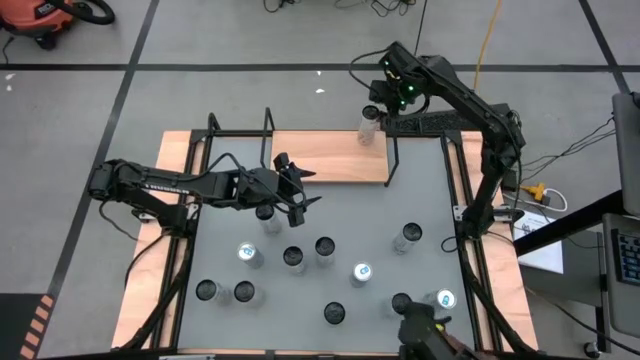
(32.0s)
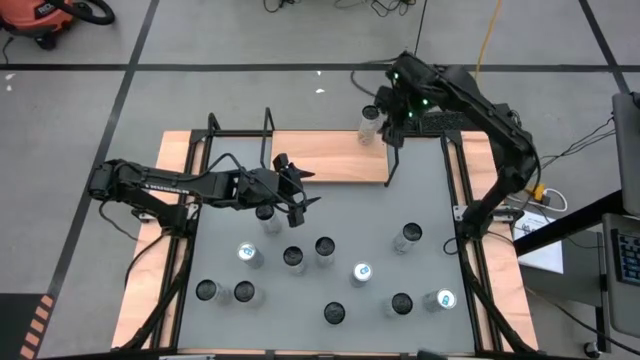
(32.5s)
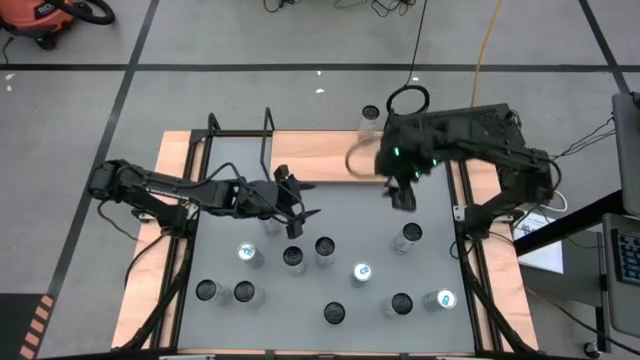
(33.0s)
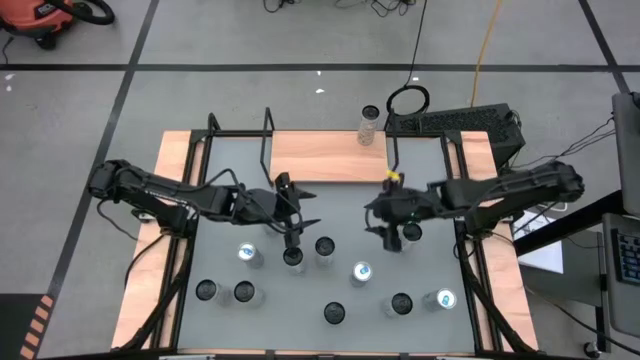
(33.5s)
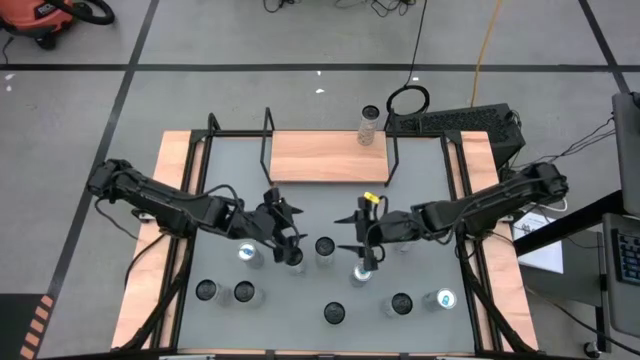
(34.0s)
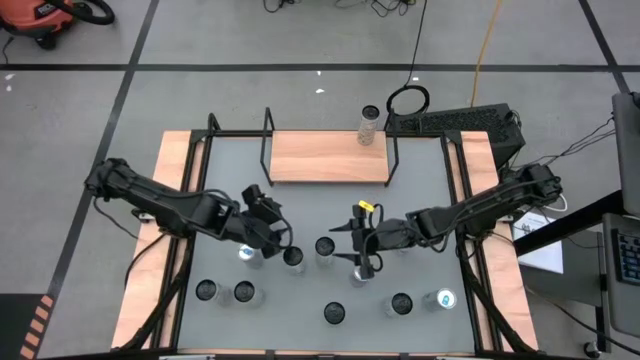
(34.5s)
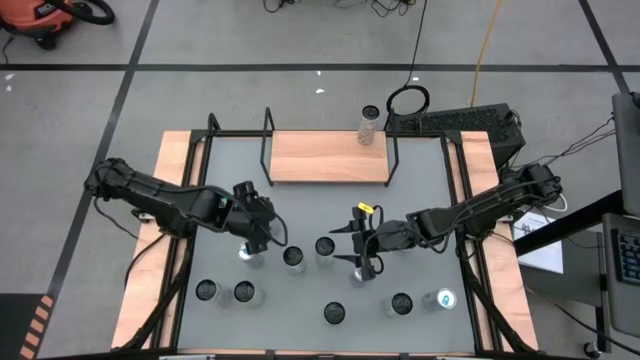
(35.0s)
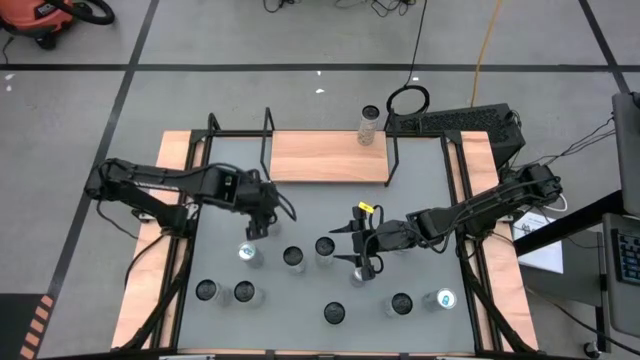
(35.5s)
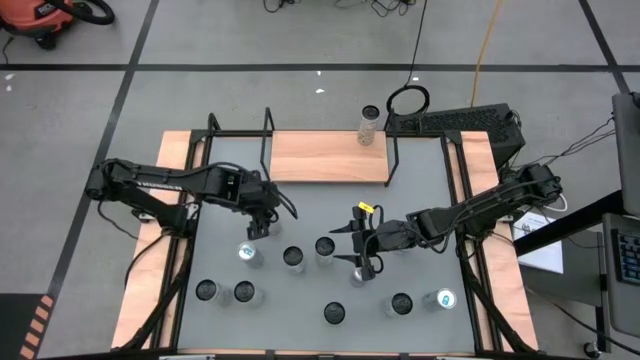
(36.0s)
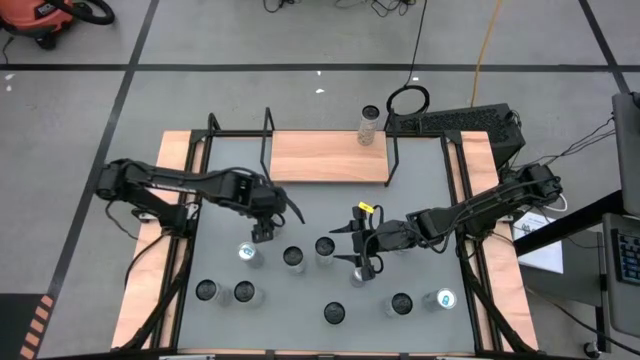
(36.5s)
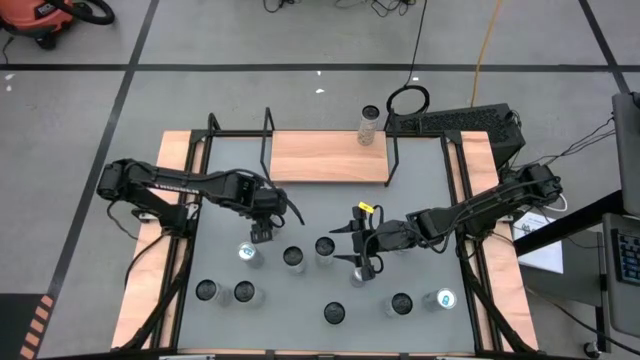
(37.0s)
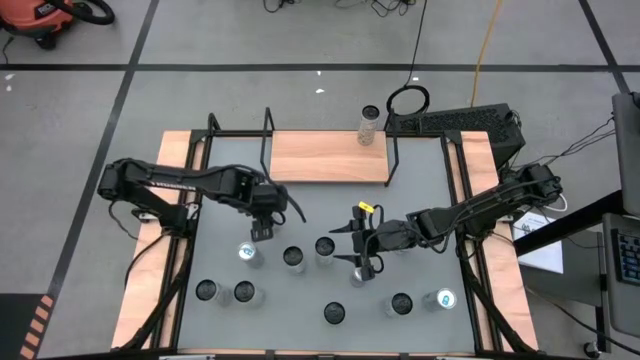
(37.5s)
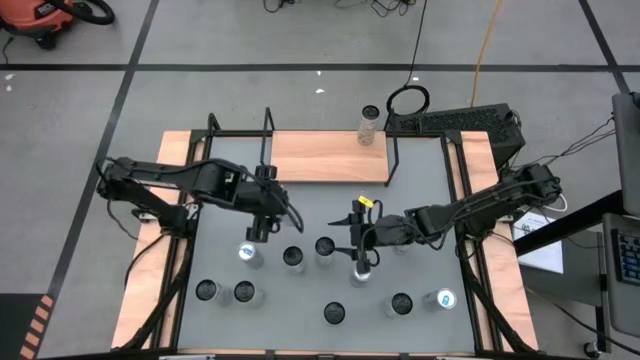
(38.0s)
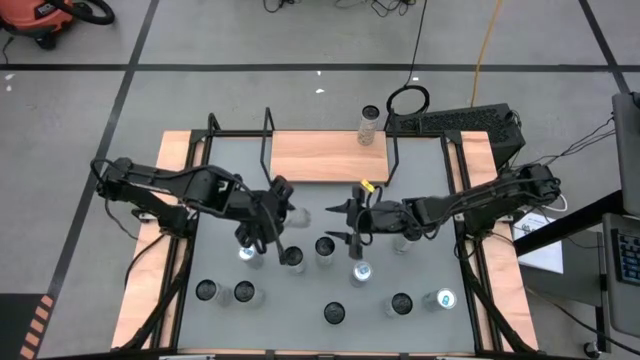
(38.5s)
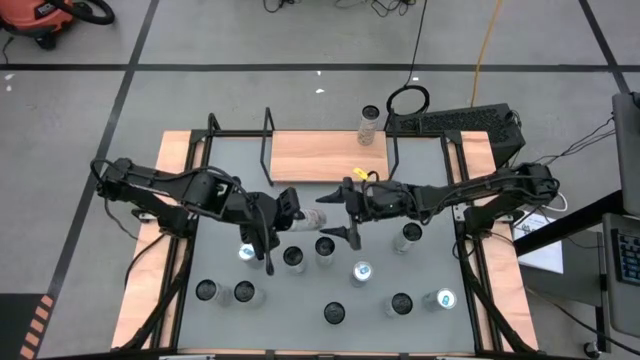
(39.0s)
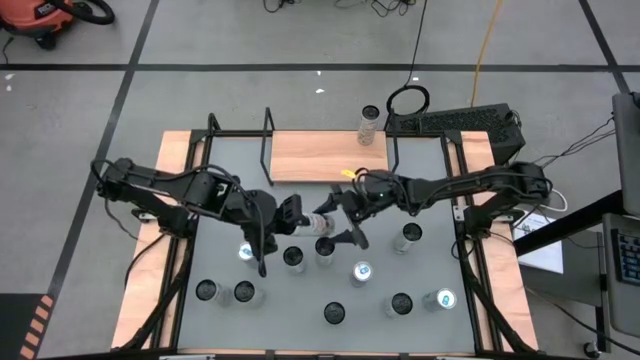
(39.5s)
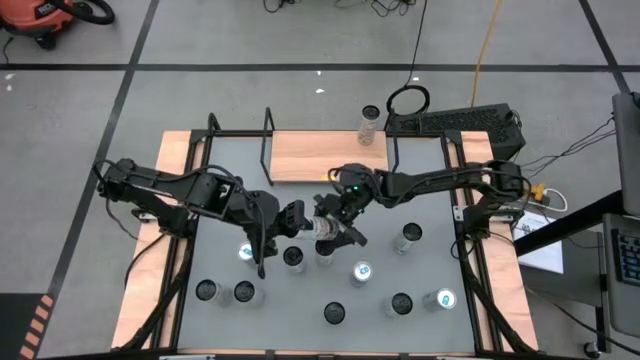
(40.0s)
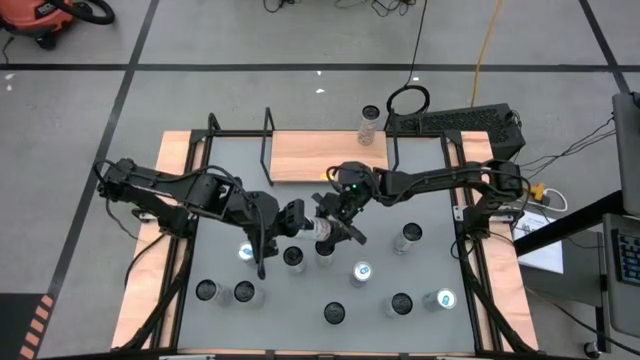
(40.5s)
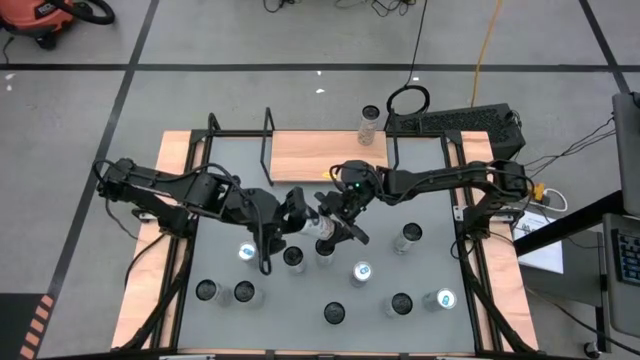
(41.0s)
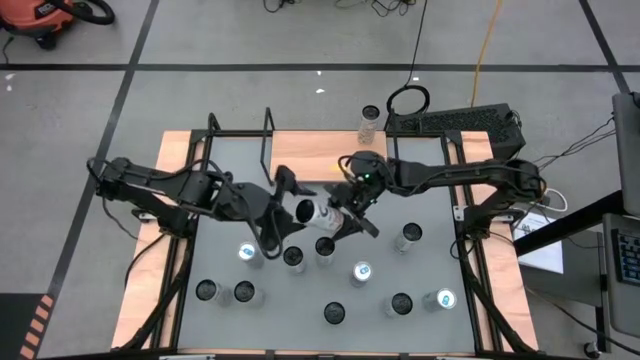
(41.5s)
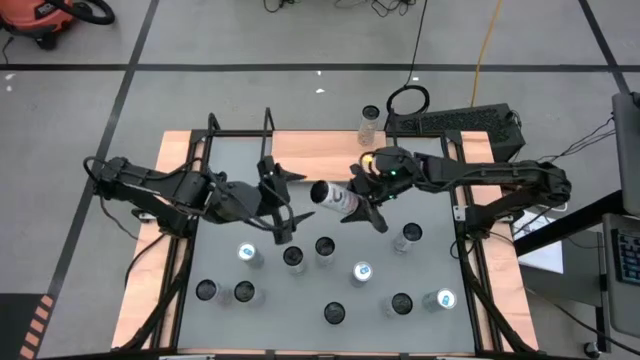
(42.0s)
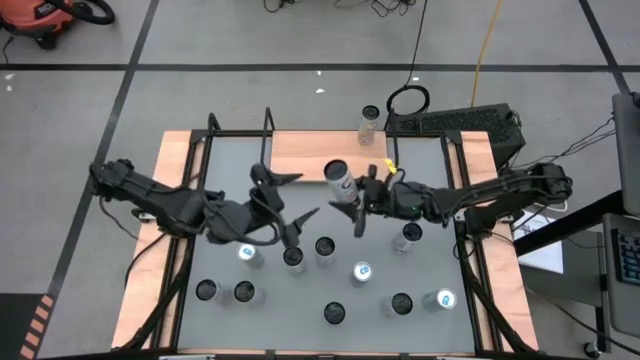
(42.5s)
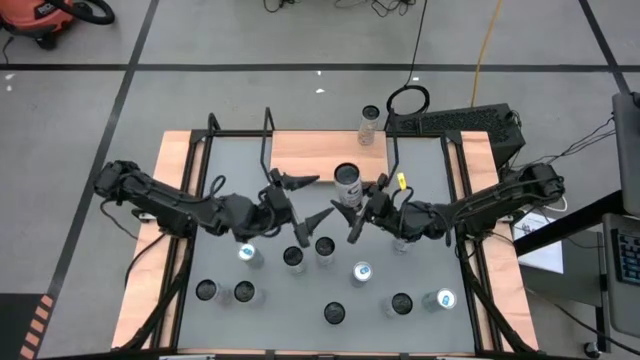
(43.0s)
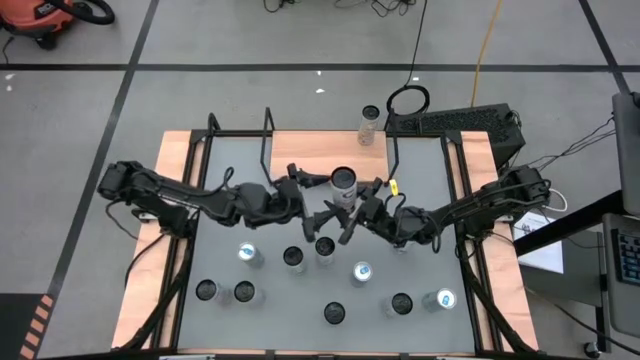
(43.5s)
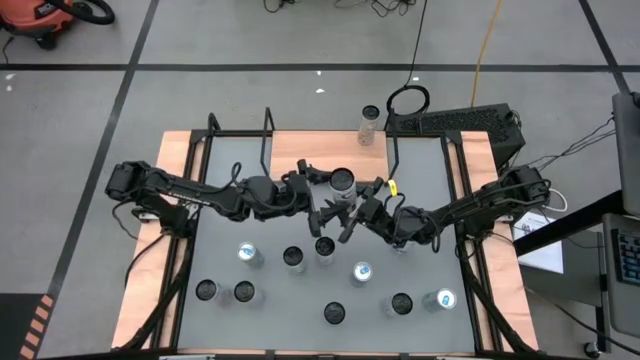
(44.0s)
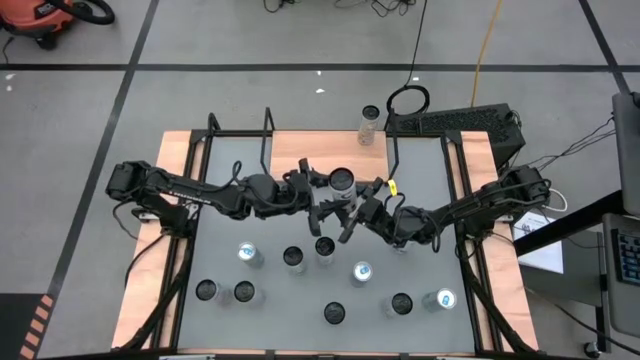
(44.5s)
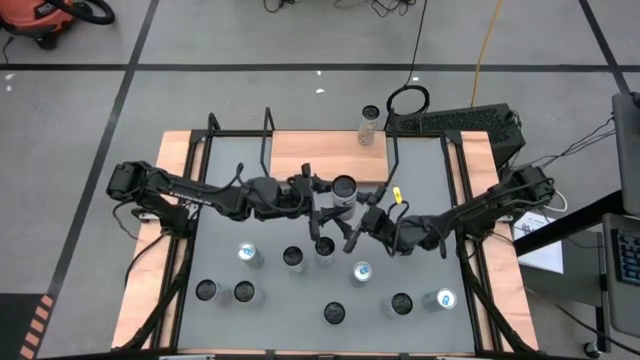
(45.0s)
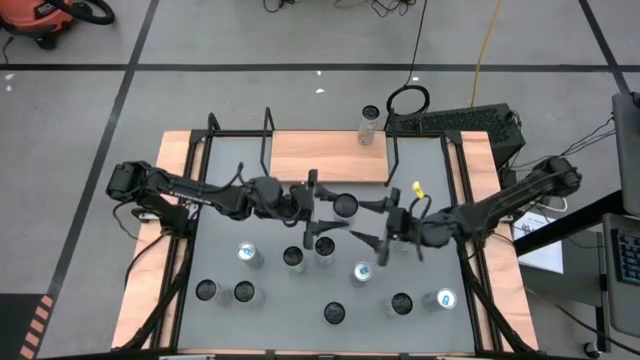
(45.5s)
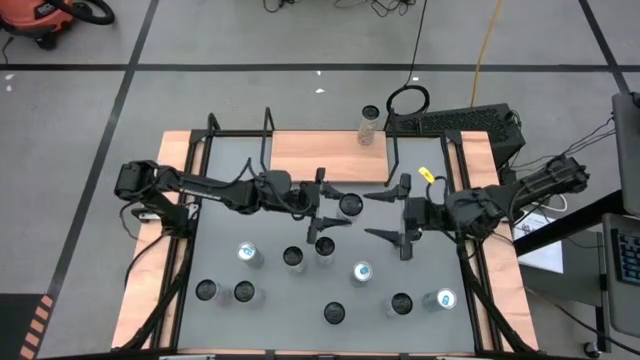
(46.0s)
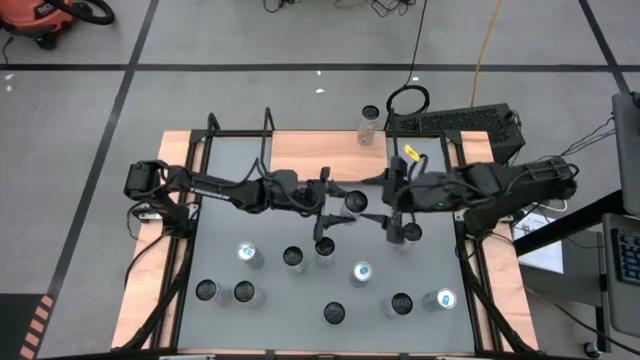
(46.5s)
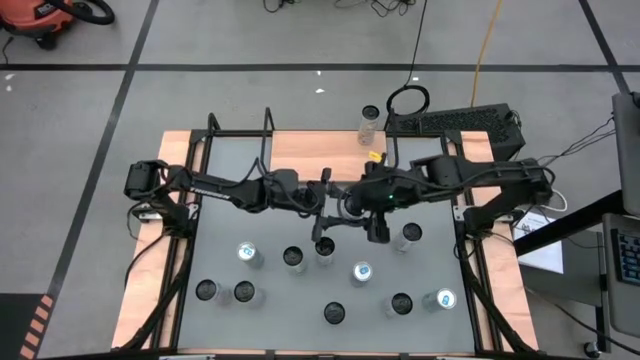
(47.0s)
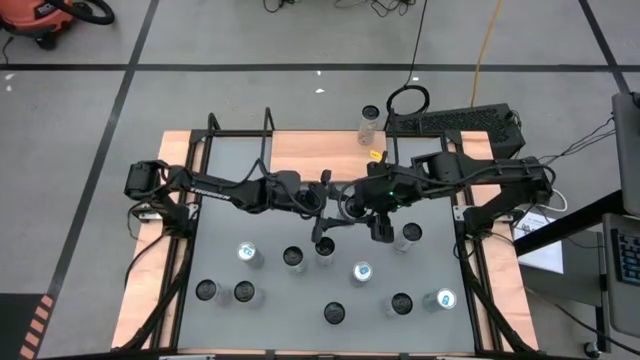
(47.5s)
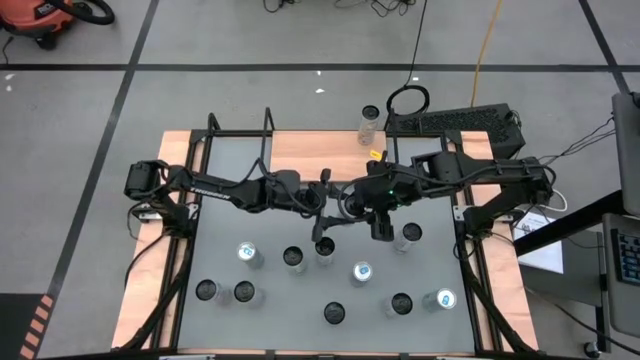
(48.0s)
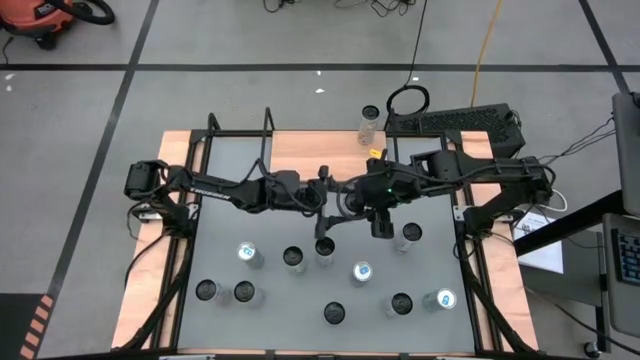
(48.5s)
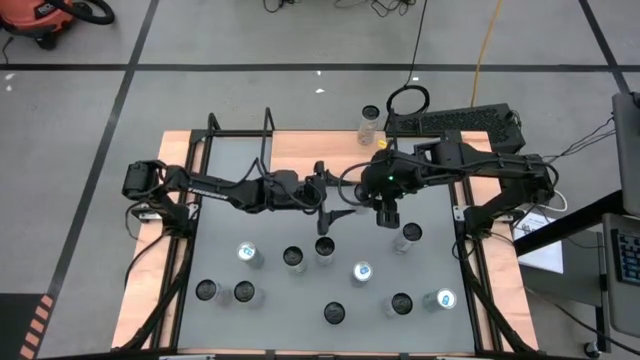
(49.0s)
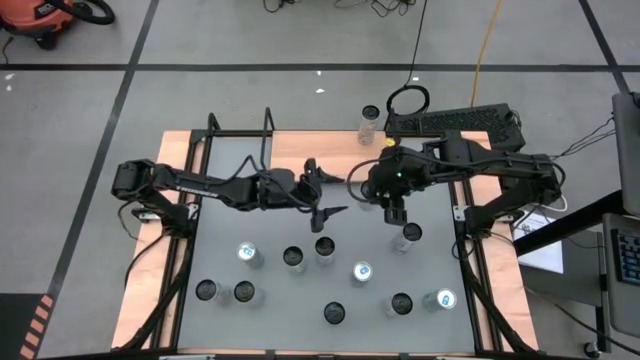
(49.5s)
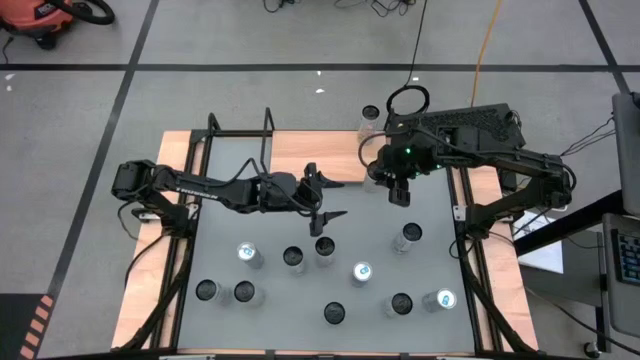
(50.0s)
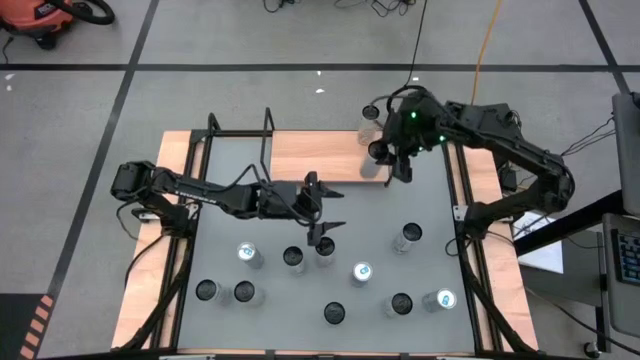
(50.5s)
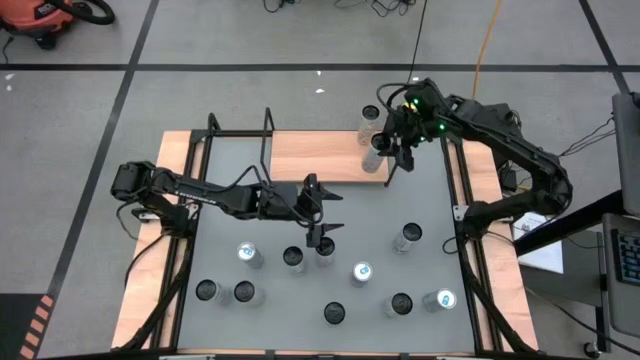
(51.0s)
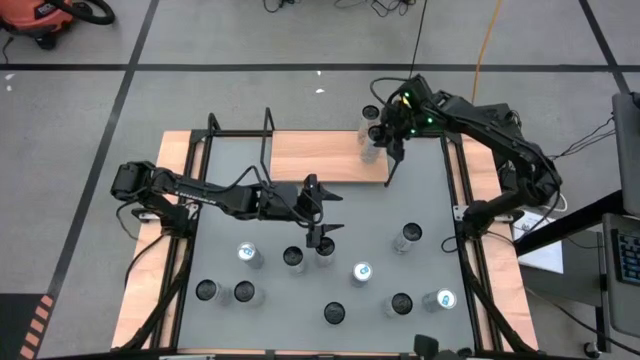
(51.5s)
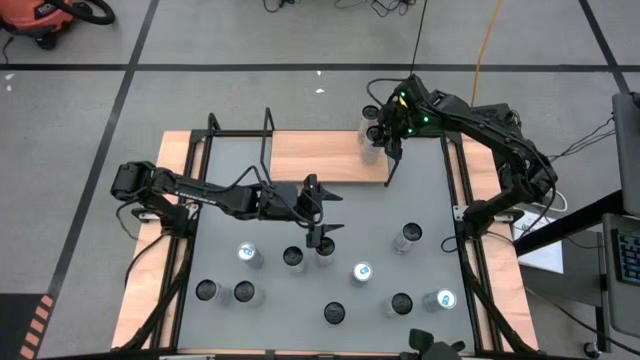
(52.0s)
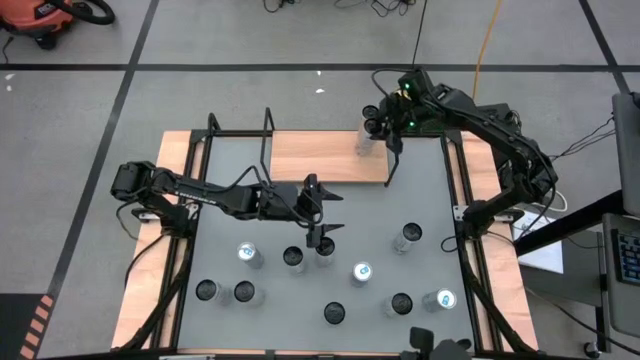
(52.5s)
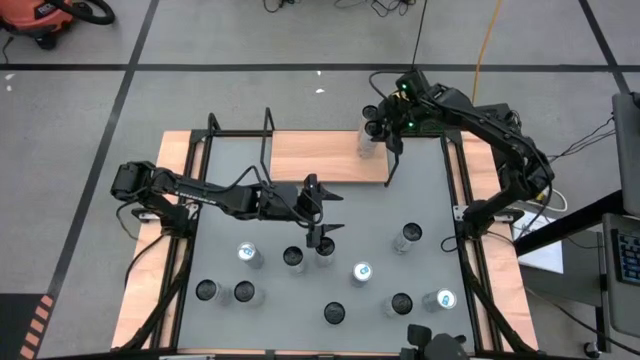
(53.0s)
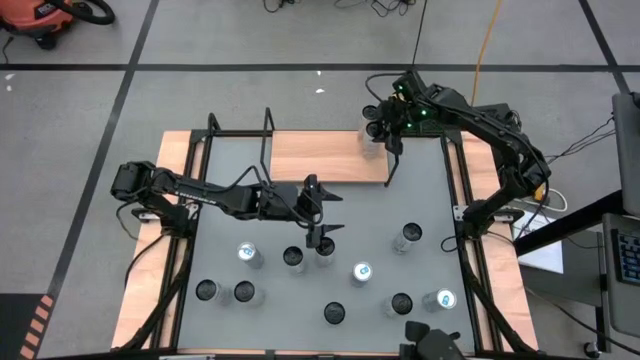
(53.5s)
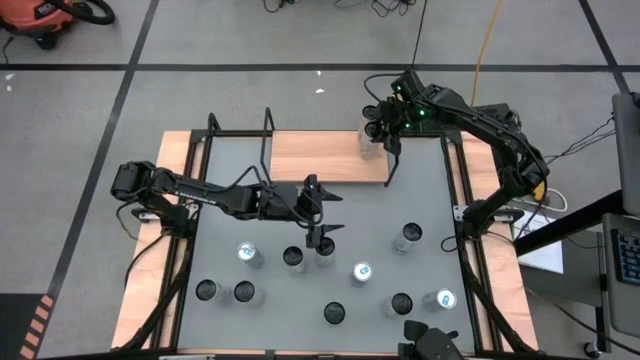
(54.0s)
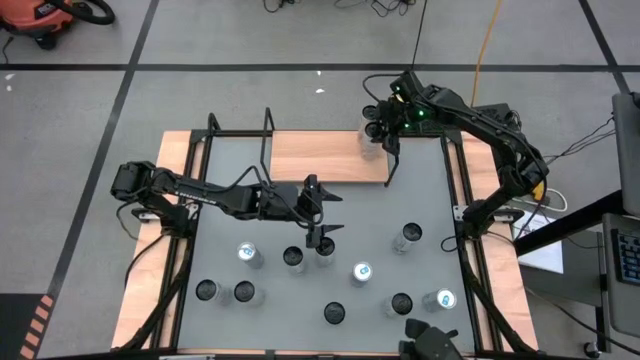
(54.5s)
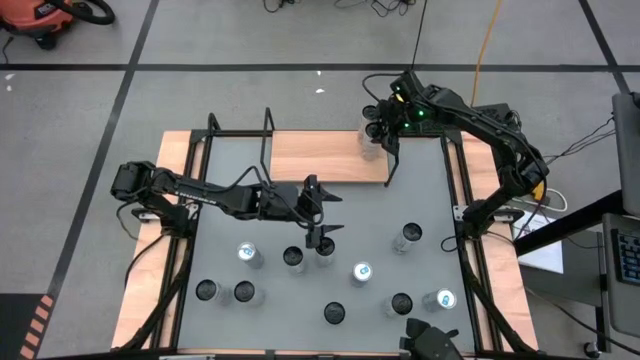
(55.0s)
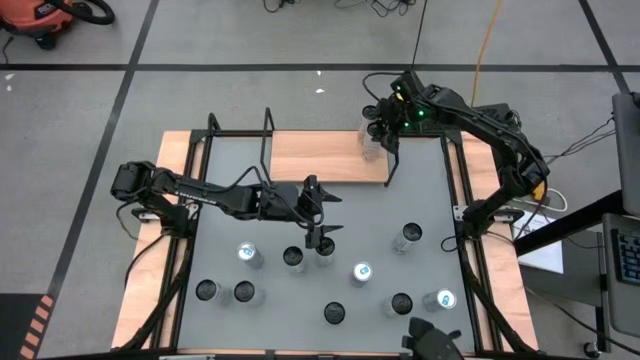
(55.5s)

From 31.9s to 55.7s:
Task: Place canned beverage on shelf
Put the top white yellow soda can on the shelf aligned with the white yellow soda can
